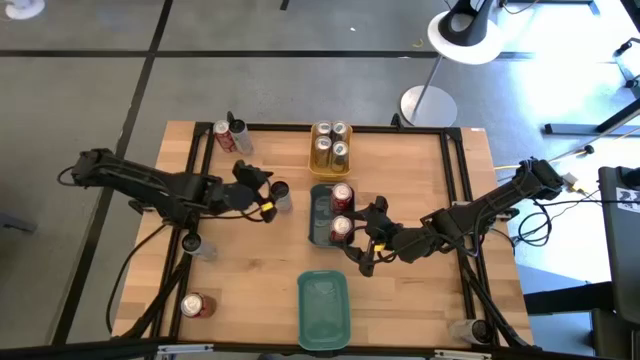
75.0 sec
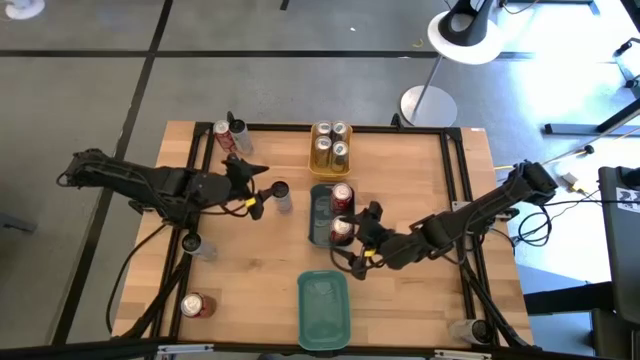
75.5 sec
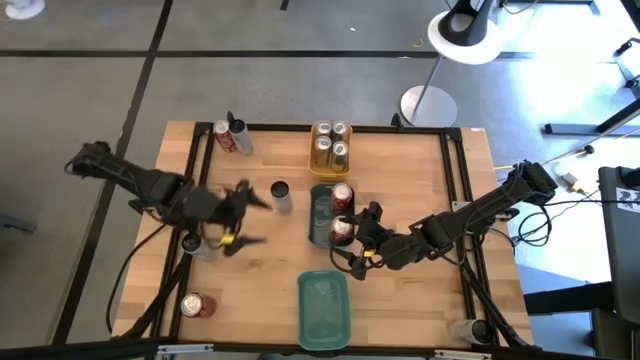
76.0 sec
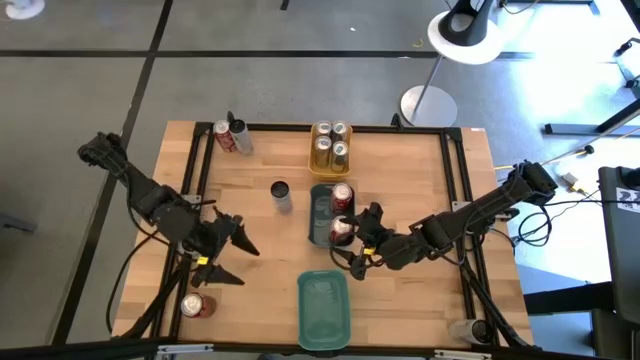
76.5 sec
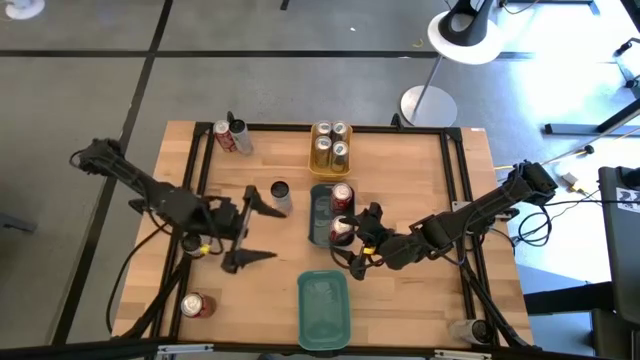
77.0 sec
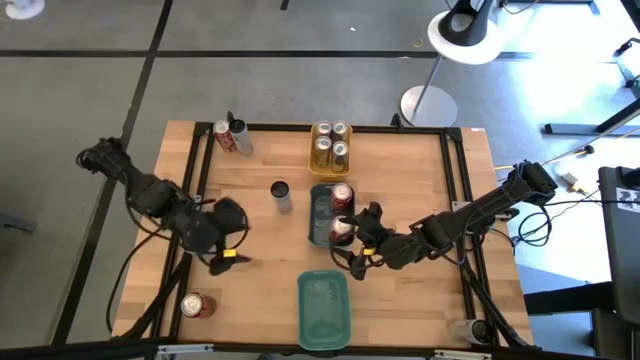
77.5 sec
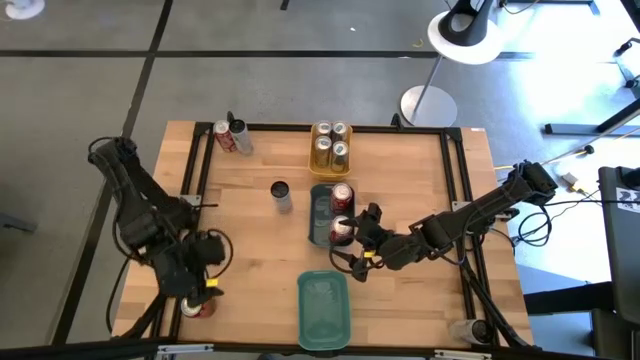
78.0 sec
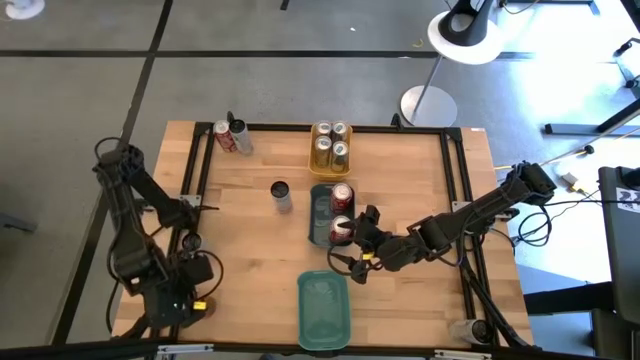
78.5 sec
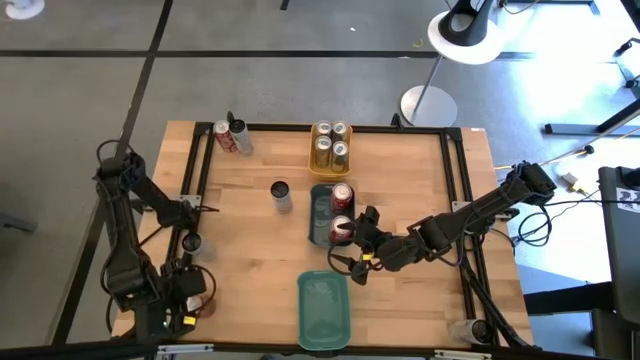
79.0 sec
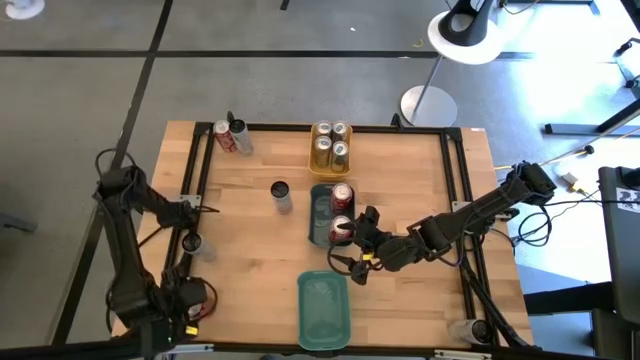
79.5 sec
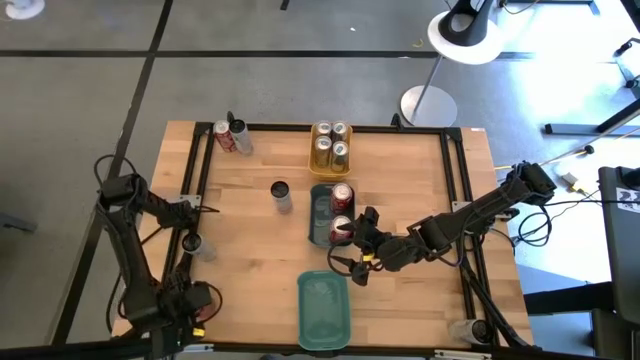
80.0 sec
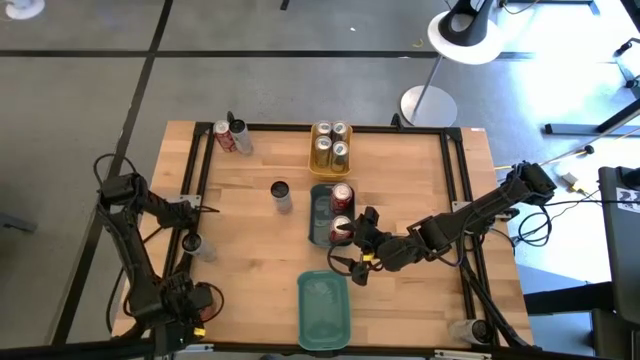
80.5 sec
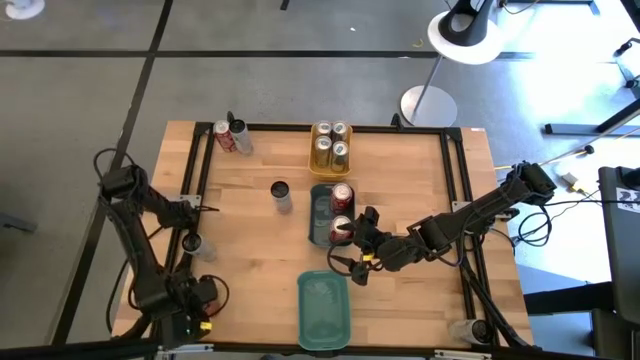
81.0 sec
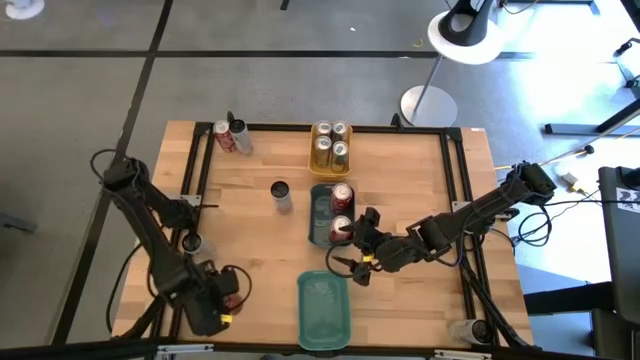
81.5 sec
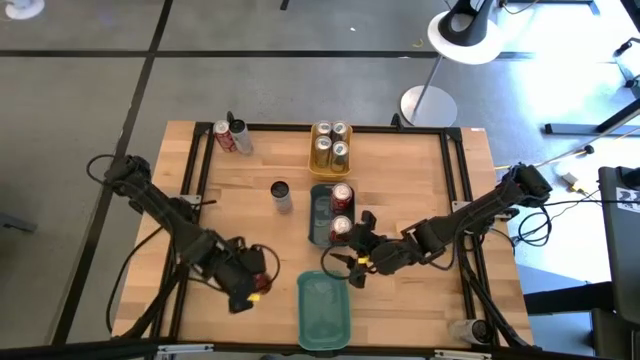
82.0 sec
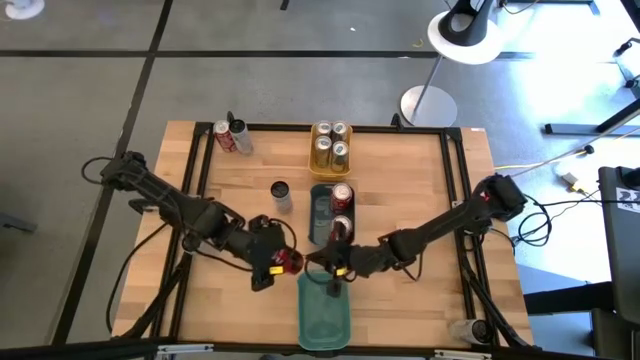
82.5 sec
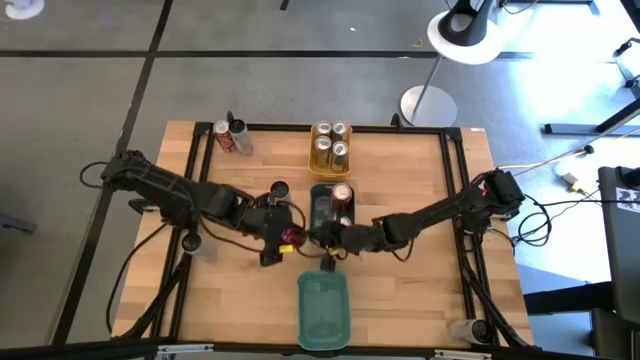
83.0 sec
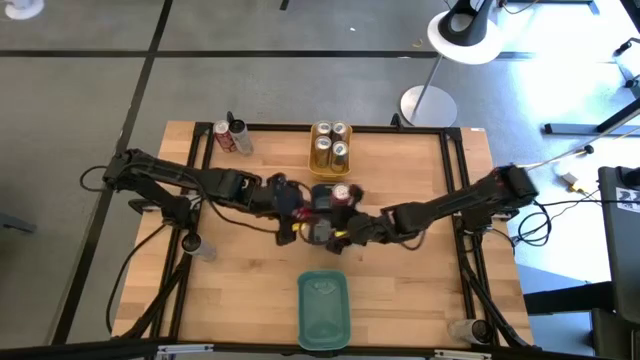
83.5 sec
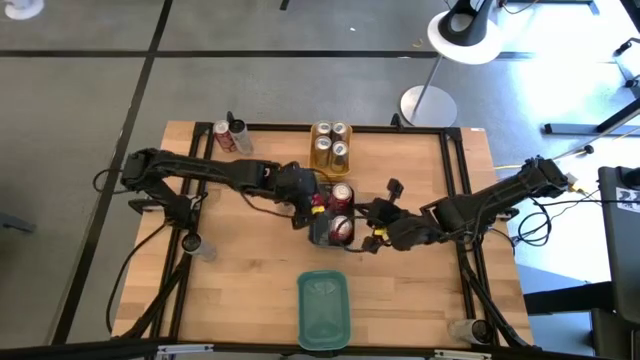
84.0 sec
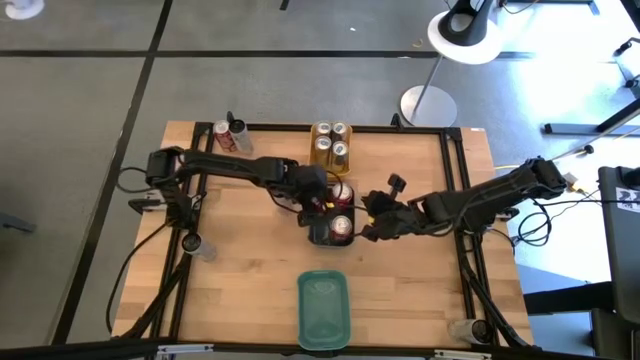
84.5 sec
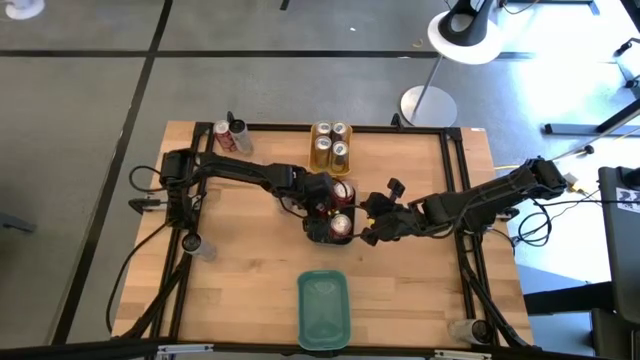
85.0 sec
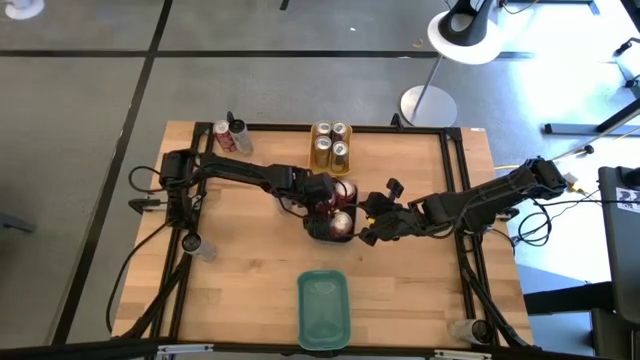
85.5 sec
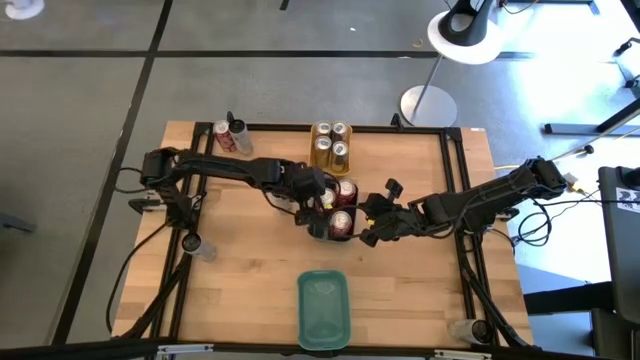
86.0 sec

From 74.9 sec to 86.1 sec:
Task: Sort soda cans
Put the bottom red, white soda can into the blue bin

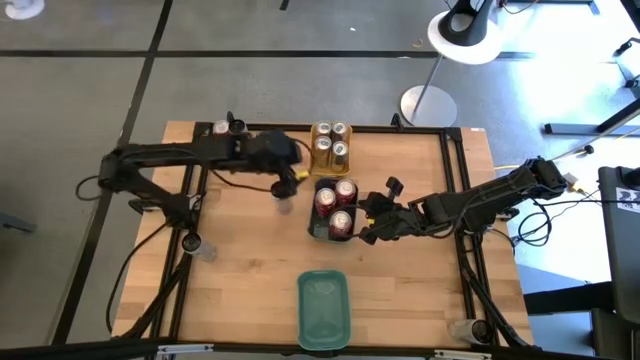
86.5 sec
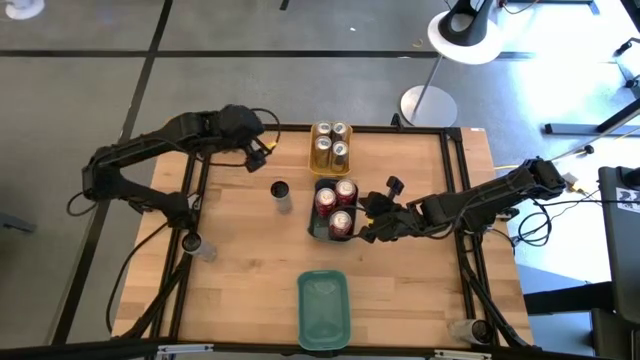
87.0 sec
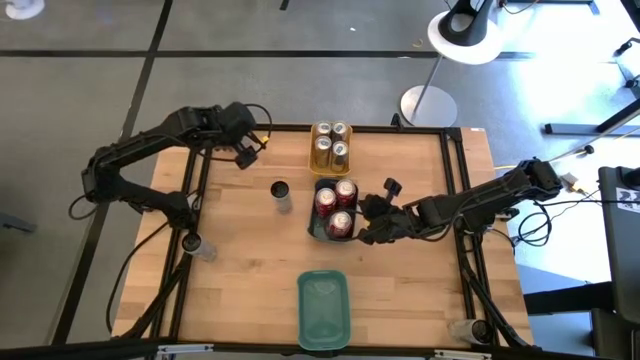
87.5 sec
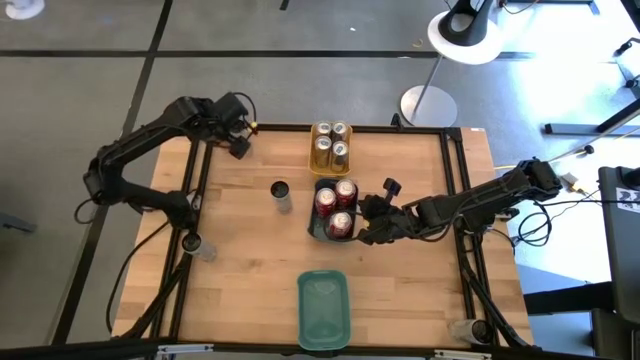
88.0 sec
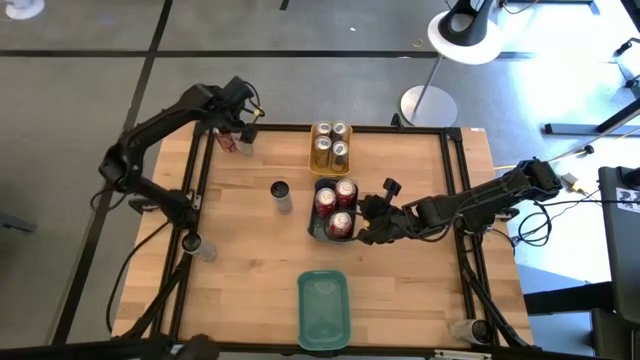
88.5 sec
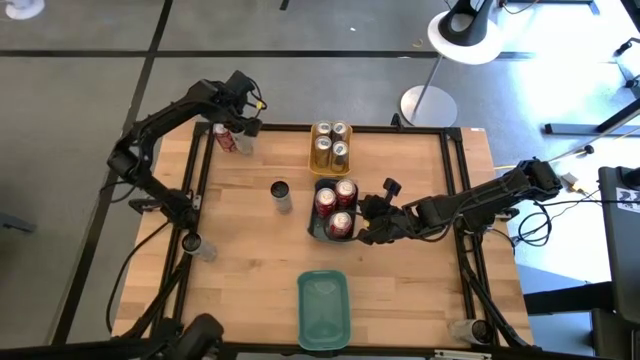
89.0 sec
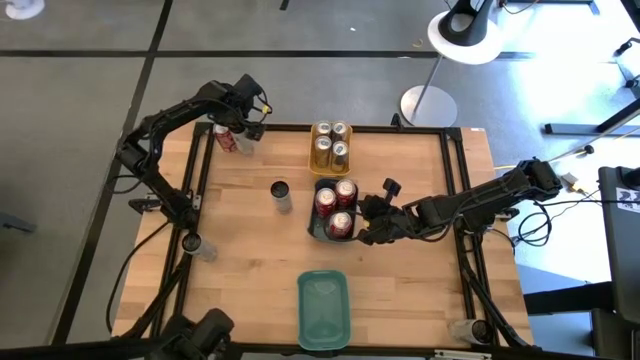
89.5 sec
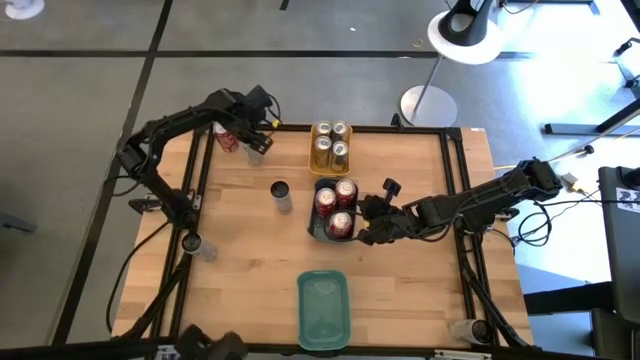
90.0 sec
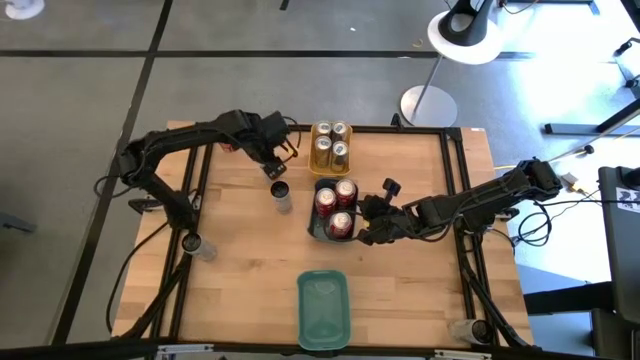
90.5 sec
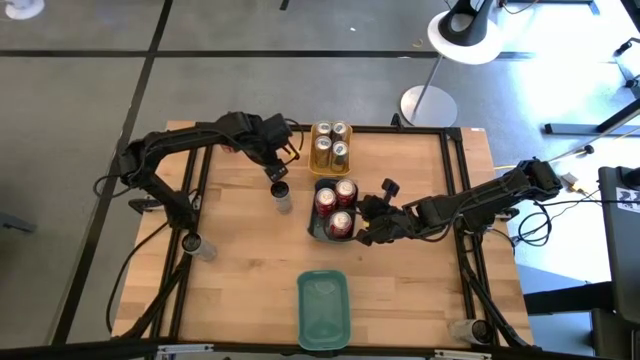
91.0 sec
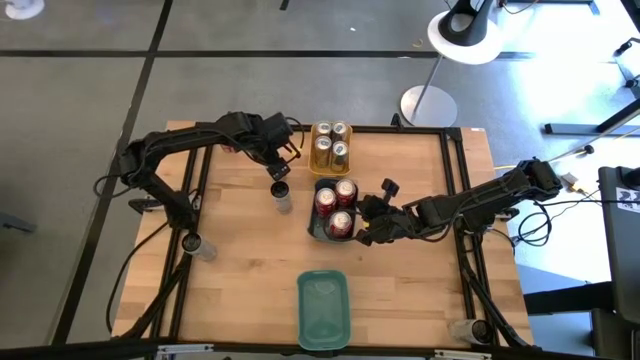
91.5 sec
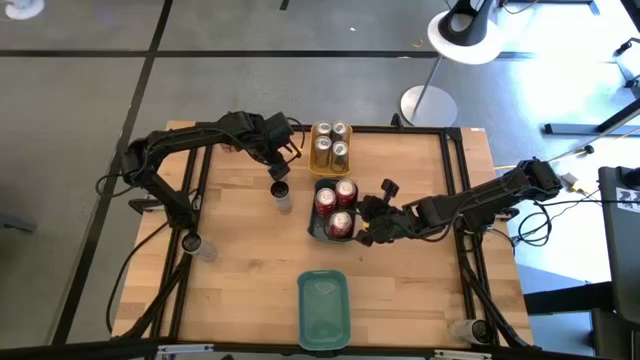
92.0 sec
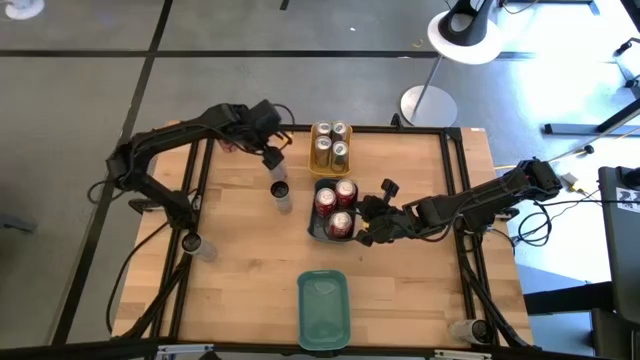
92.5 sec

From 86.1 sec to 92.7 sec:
Adjust the top white, pink soda can

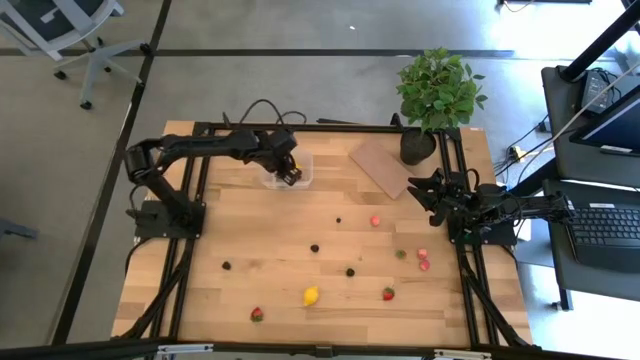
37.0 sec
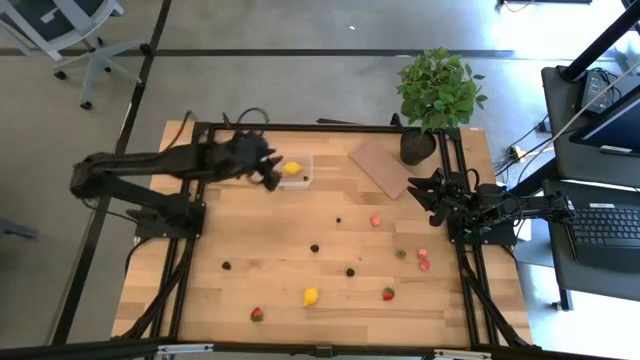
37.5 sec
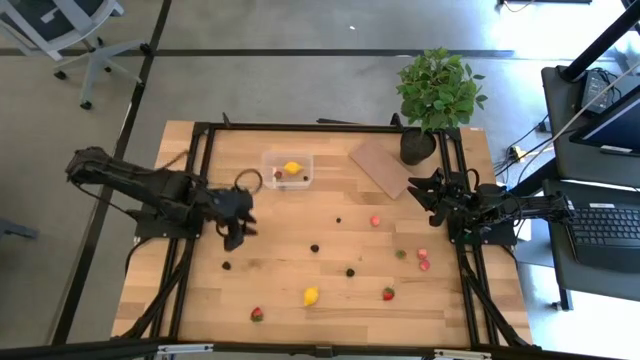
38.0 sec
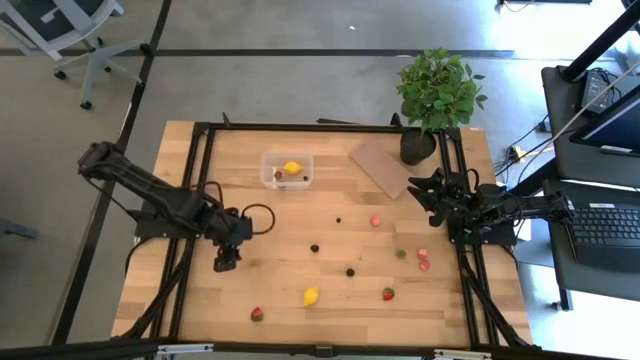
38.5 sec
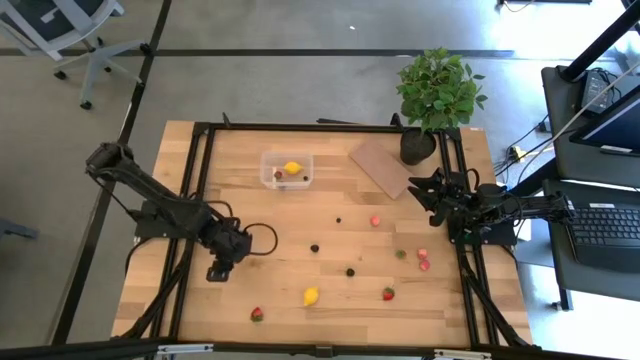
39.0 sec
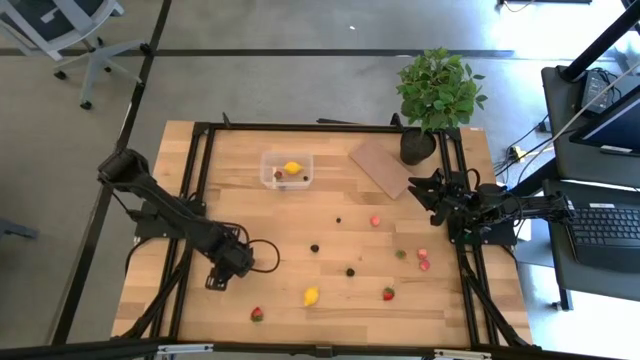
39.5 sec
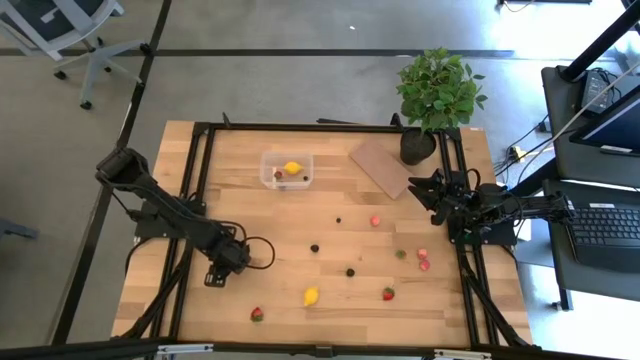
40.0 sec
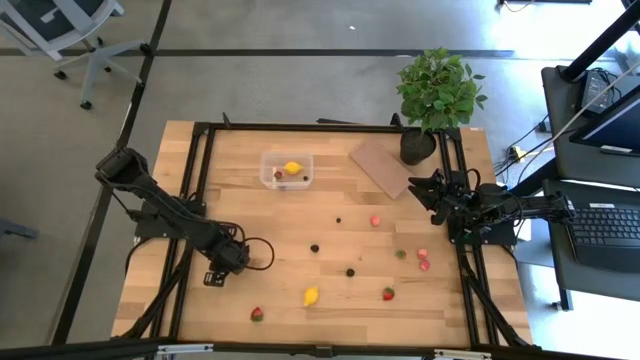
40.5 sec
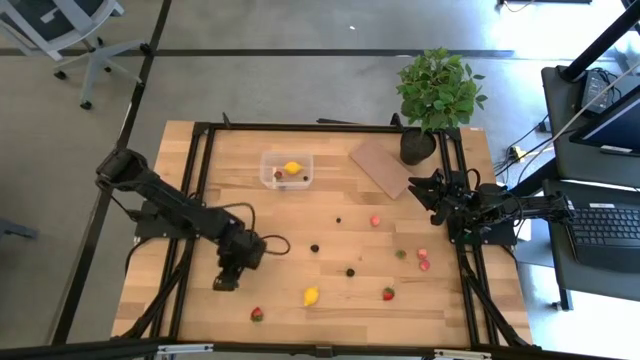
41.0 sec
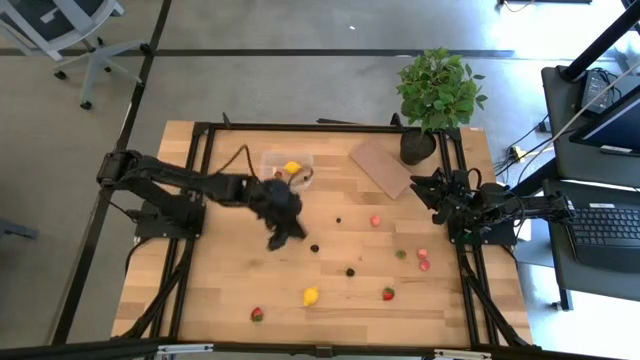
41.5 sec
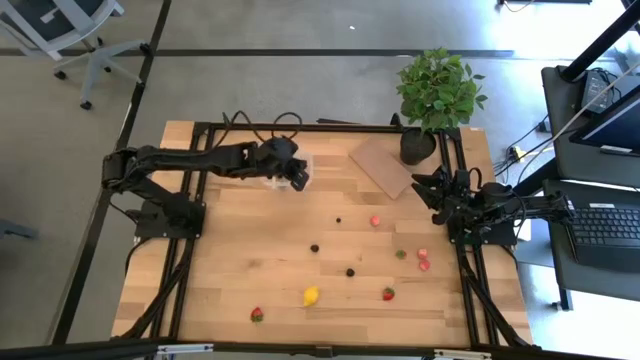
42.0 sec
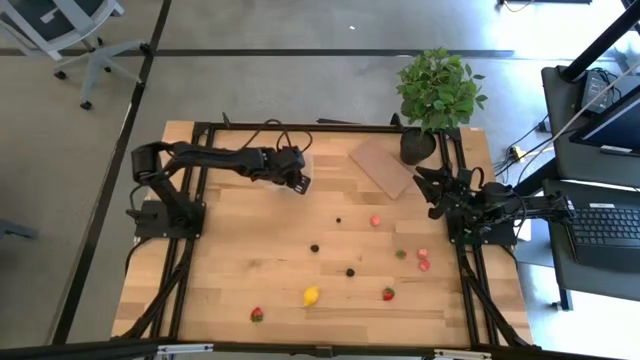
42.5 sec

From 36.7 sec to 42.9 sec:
Task: Pick and placing Produce into tupperware
Put the blackberry into the transparent bin
